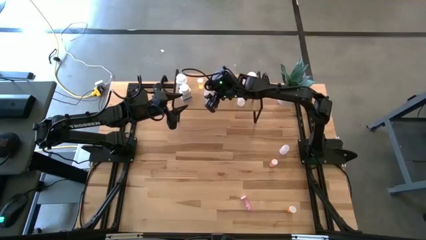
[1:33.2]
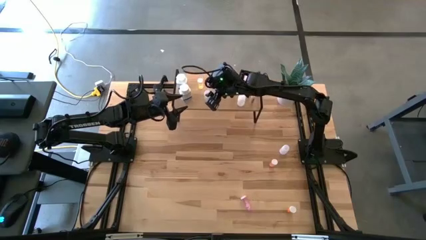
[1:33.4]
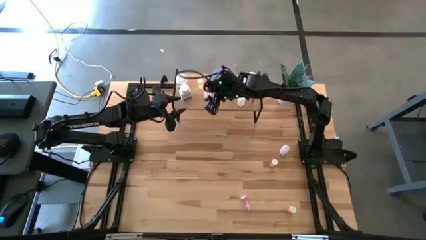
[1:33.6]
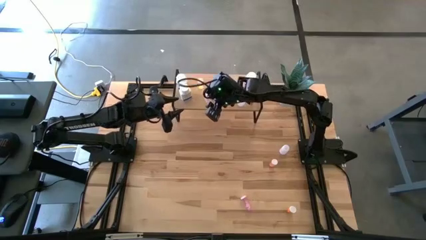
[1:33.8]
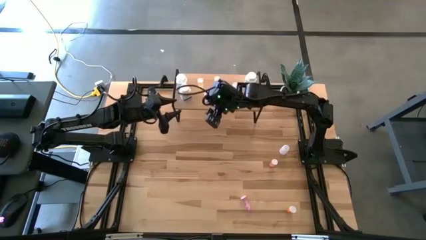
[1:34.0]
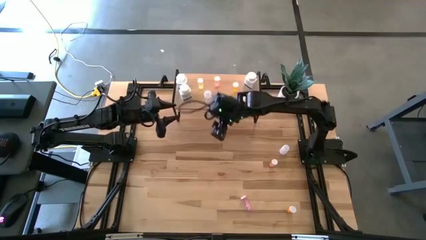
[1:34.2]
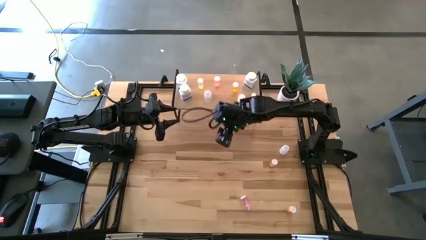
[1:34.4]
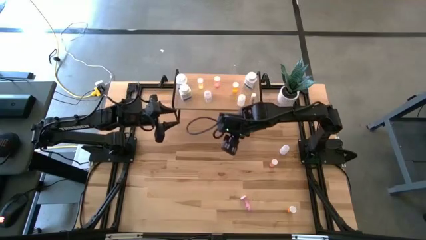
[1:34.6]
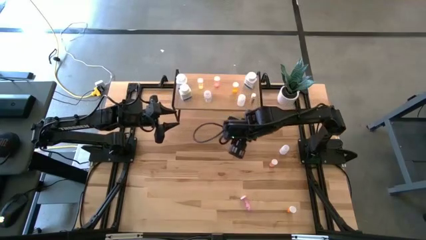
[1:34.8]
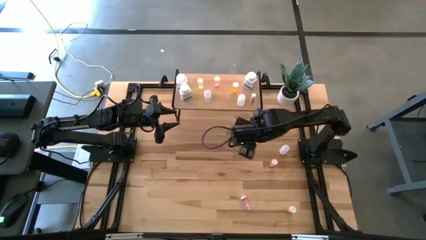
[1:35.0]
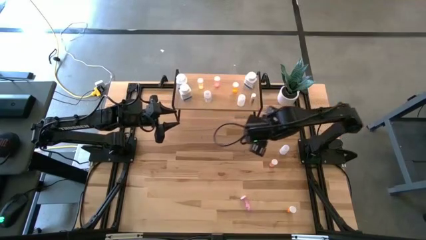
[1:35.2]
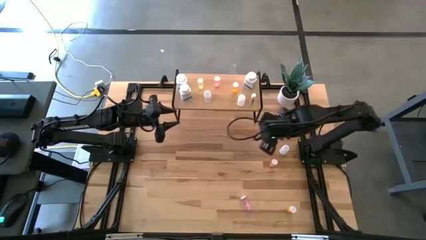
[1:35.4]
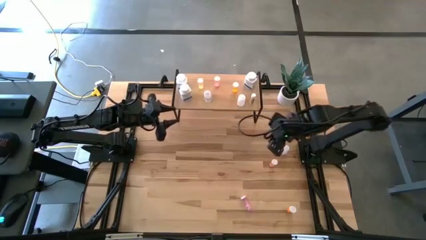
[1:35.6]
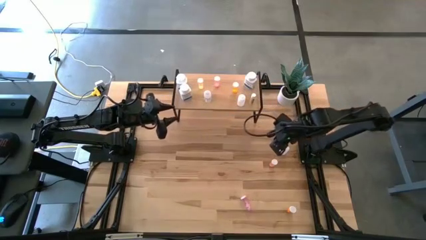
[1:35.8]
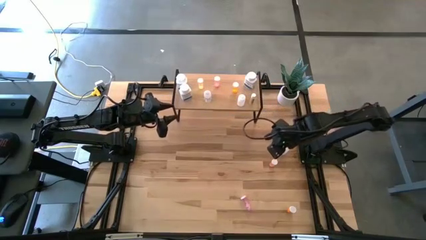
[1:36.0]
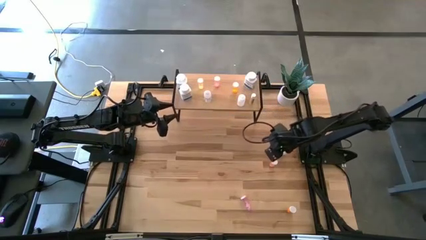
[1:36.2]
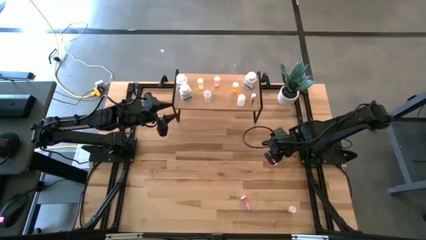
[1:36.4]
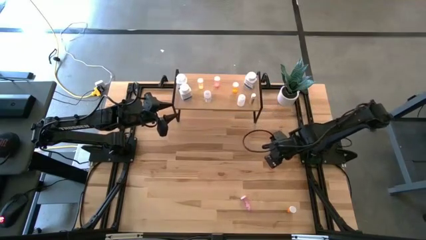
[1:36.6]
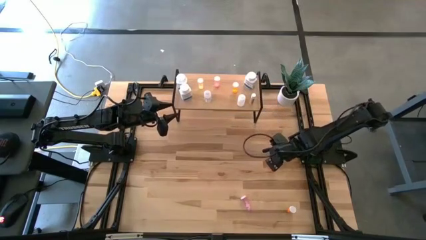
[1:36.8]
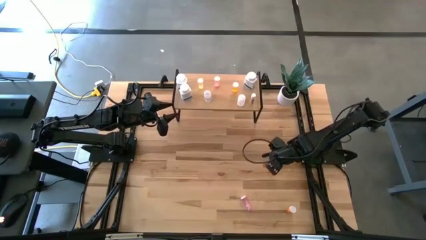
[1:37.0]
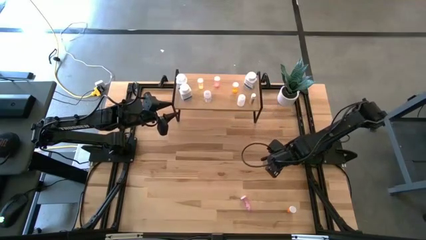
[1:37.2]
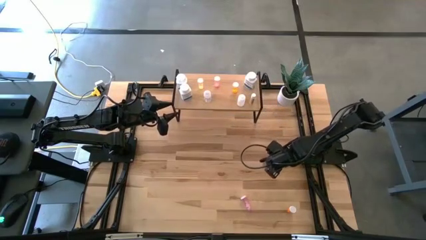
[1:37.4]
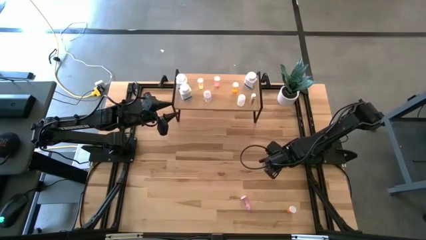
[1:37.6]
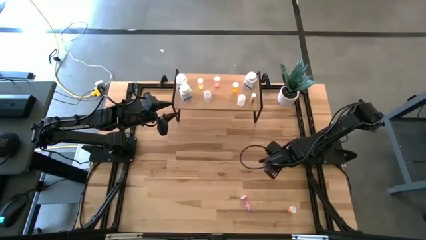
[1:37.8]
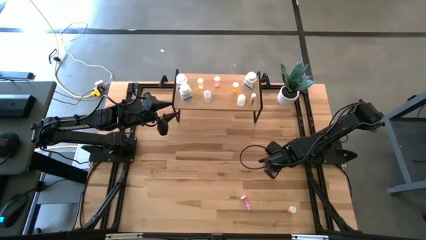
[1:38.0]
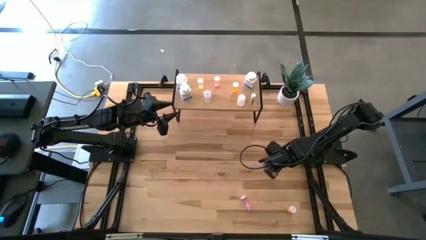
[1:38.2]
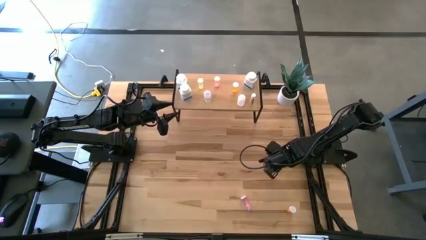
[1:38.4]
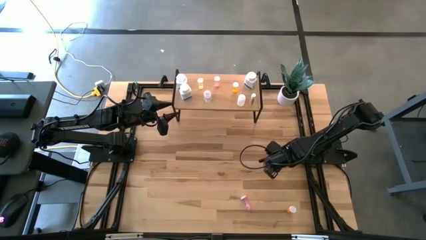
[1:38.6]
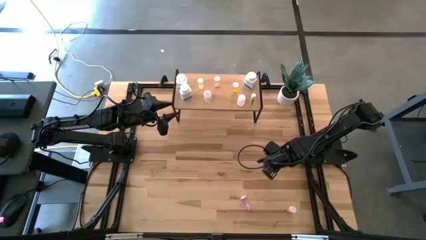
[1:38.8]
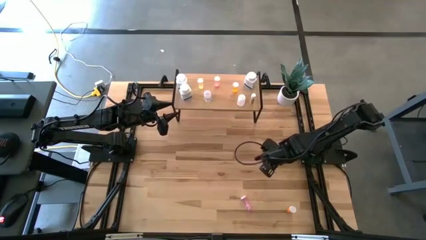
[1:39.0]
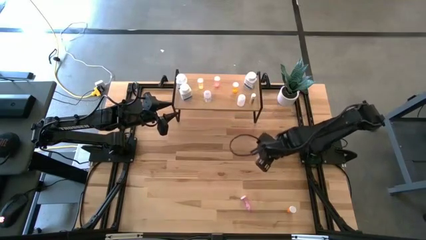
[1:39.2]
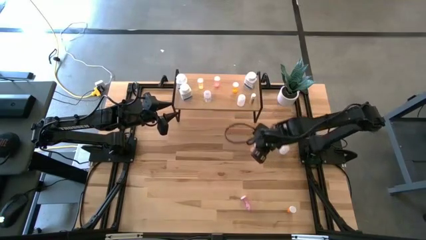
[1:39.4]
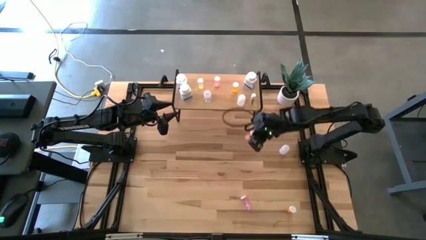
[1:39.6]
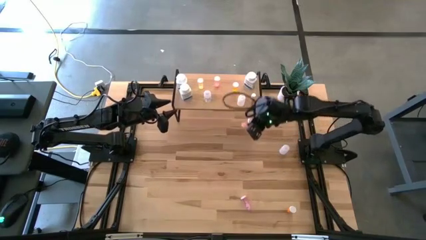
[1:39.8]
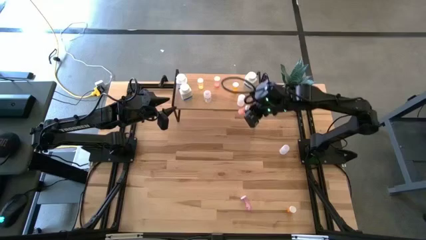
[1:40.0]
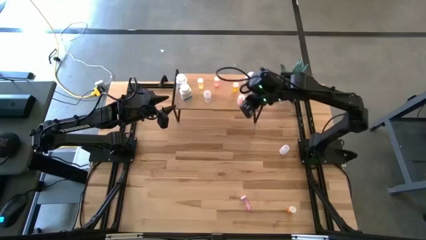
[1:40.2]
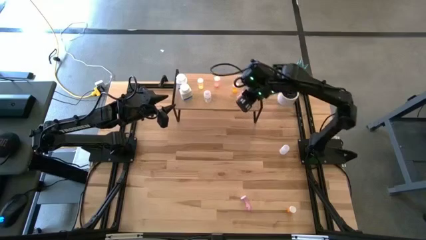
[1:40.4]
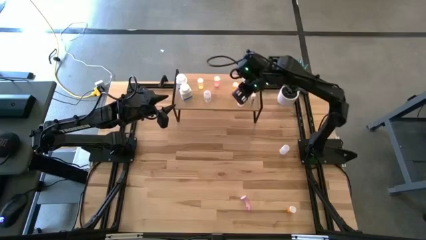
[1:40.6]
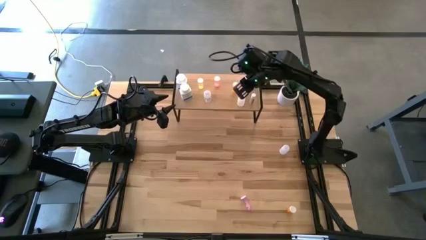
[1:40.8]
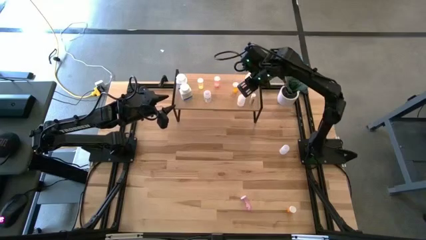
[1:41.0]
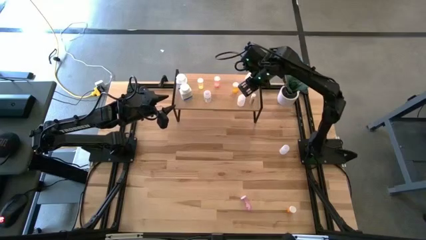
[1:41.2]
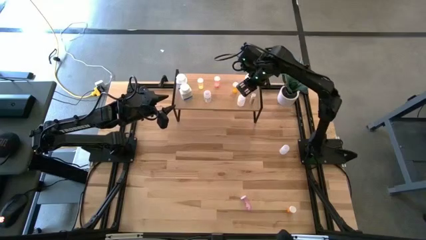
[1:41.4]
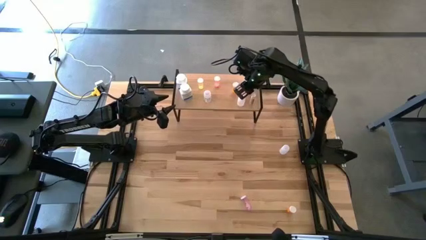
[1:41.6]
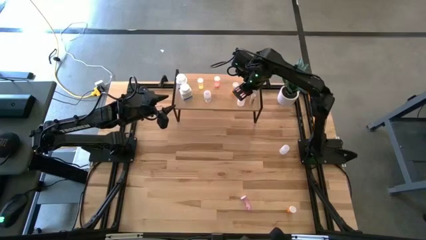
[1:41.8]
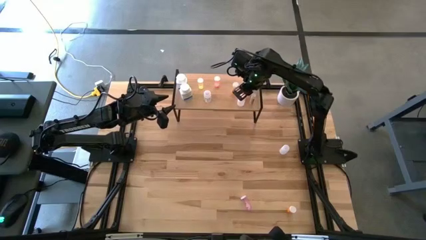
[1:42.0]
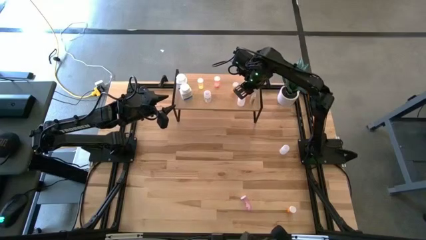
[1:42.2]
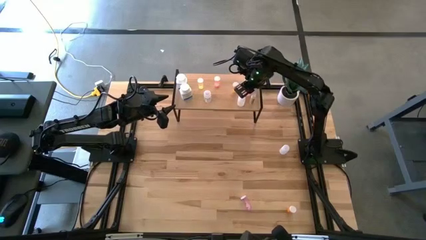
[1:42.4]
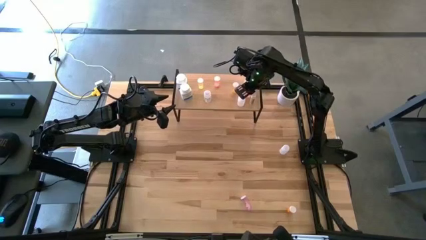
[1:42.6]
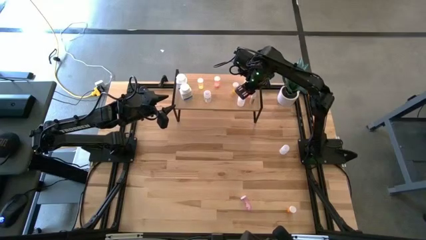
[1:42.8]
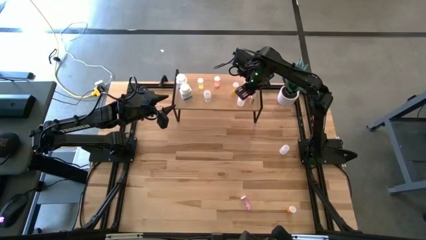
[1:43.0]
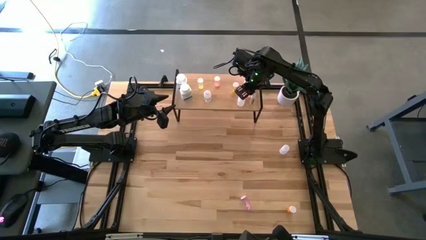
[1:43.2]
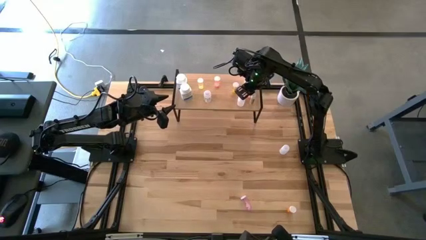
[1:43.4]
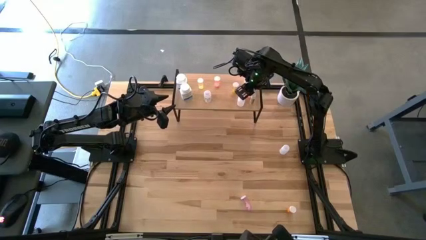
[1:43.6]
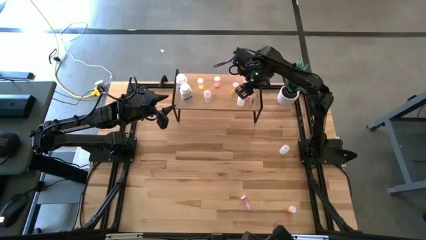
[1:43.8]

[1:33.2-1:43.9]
Task: Pick and place medicine bottles onto shelf by color
Put the pink pill bottle on the shelf

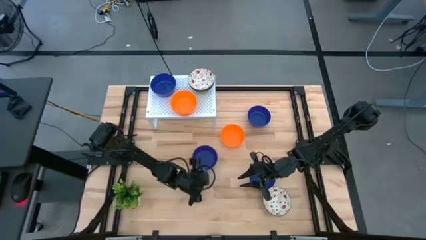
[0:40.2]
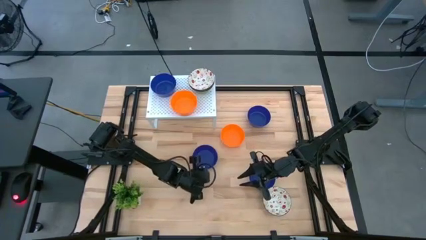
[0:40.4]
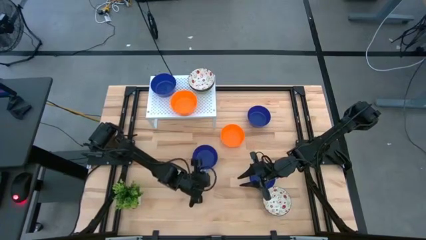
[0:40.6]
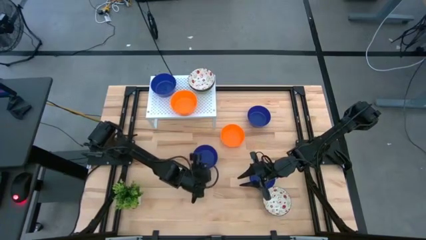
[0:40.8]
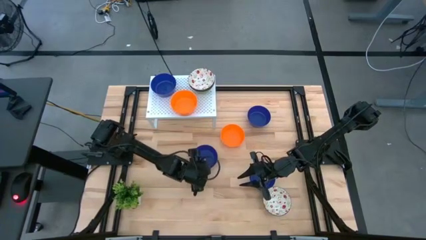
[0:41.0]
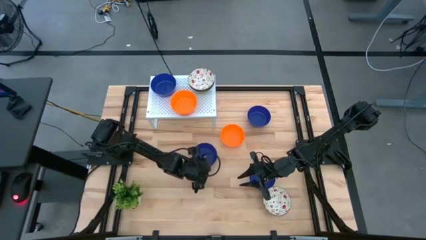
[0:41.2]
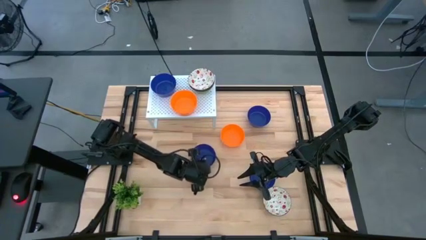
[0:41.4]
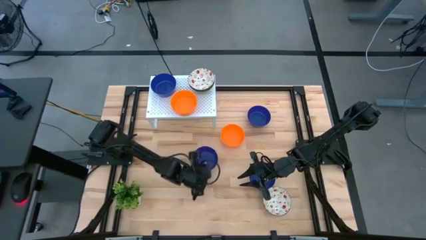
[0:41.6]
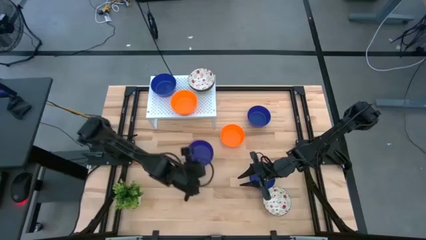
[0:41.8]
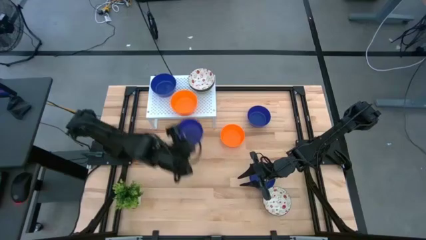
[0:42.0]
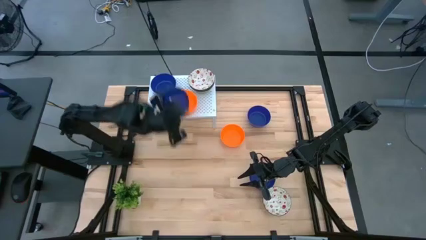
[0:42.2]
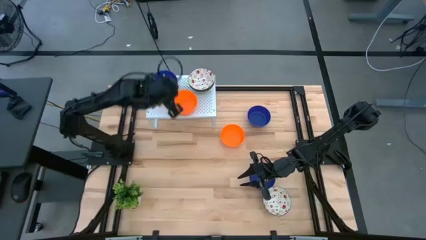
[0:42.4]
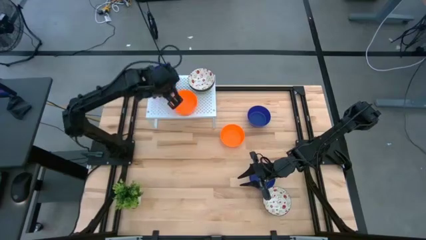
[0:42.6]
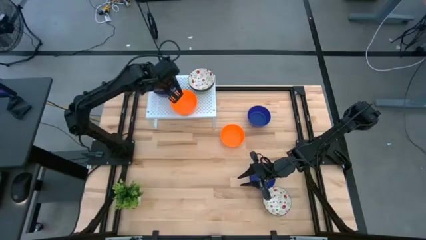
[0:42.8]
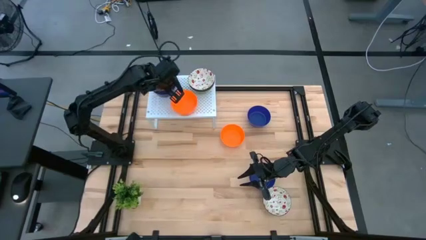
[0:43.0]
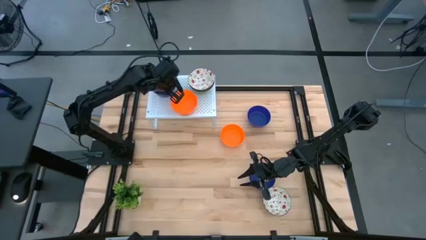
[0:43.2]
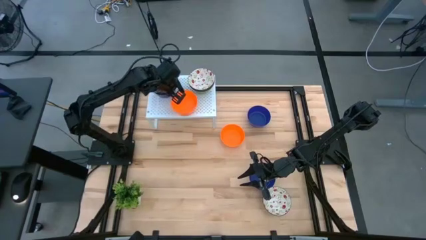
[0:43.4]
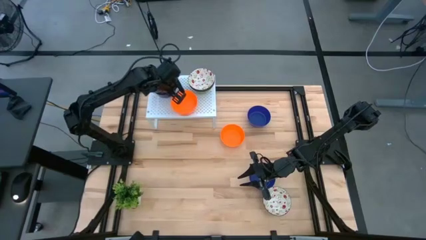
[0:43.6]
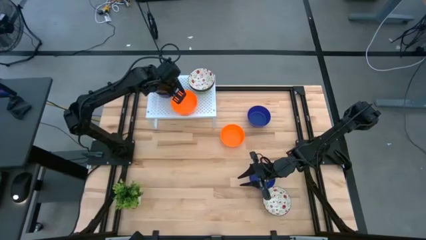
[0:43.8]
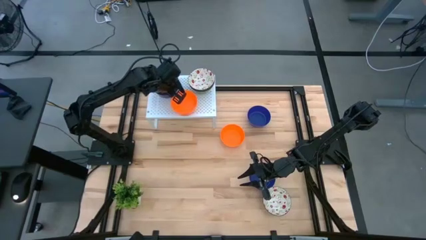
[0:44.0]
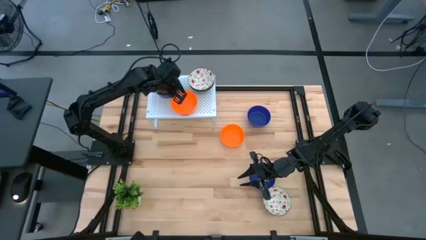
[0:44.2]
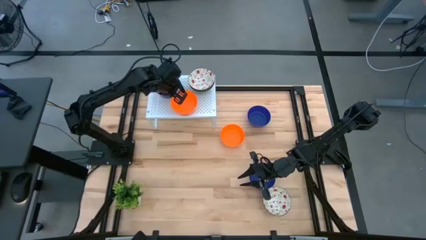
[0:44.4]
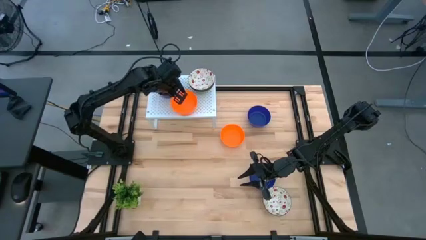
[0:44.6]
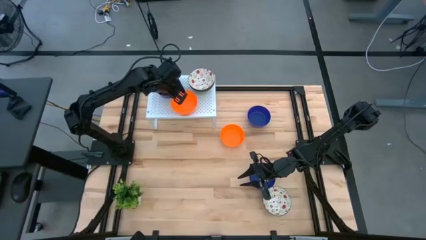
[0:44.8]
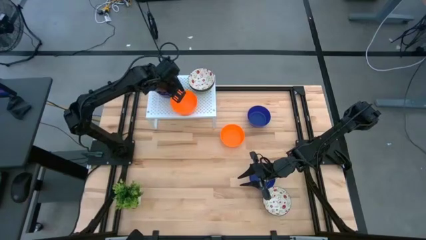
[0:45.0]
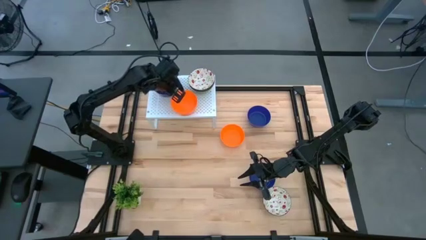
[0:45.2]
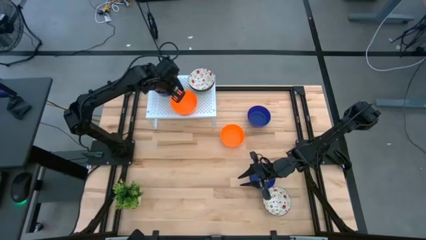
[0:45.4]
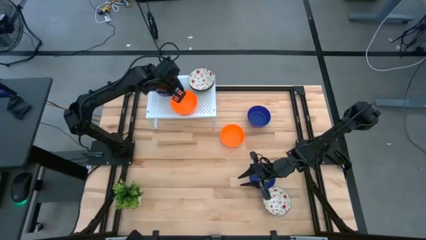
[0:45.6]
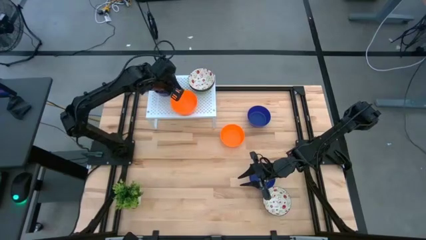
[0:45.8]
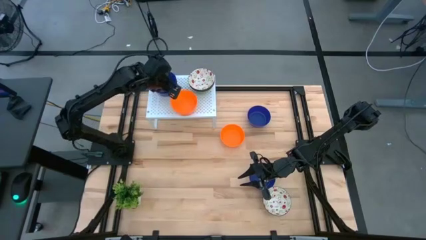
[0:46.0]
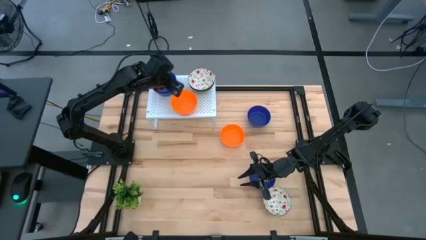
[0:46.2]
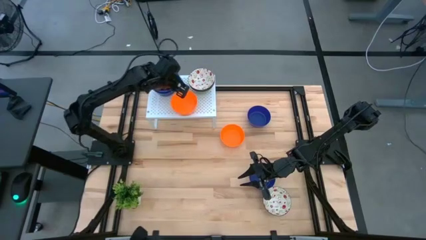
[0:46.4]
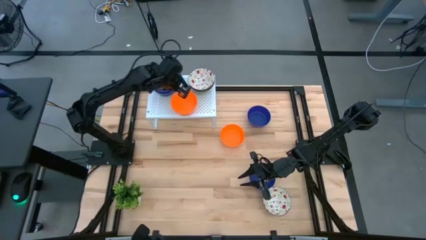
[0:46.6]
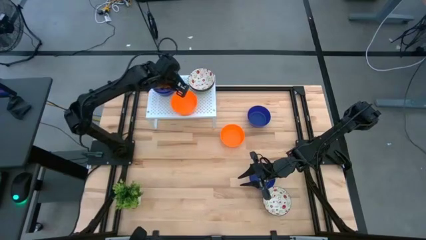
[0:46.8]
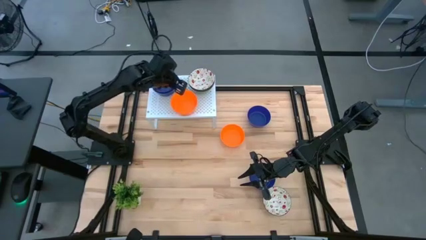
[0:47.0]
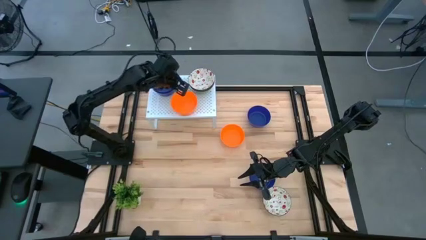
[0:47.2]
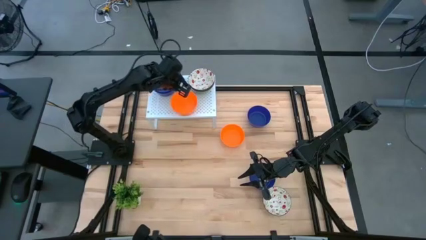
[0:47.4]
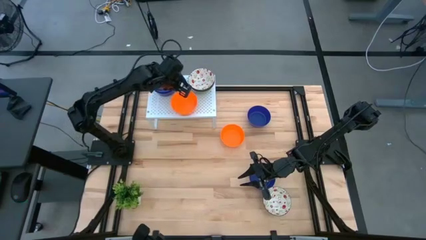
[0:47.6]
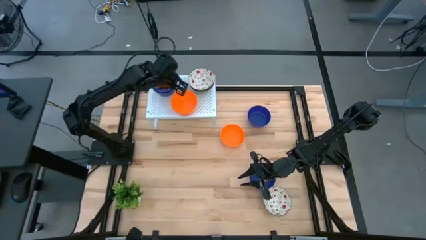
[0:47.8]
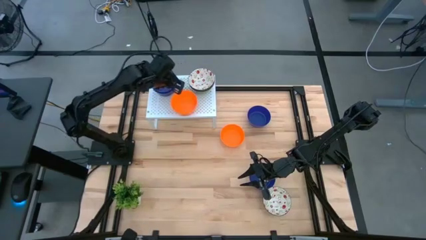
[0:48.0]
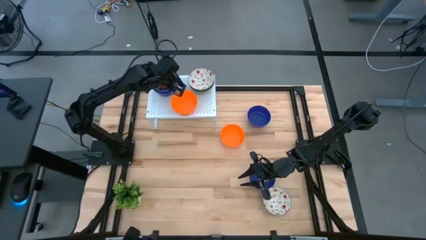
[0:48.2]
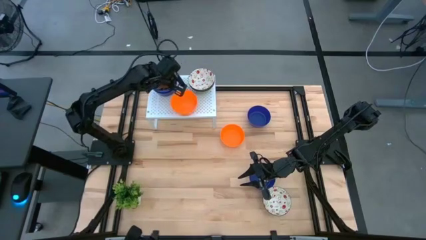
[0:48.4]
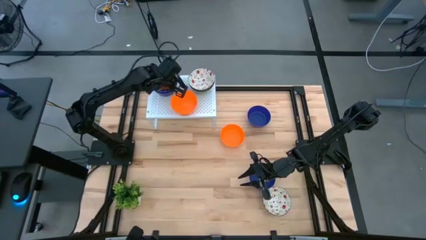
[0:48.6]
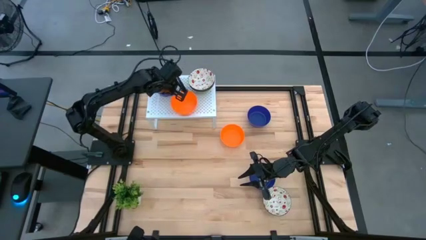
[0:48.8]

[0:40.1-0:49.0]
Task: Pick & Place Mini bowls
Stack the blue bowl on top of the blue bowl on the shelf
